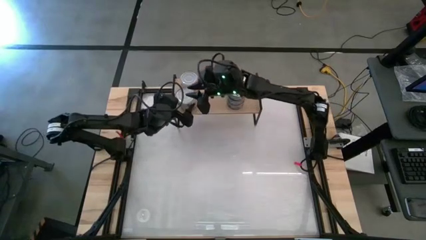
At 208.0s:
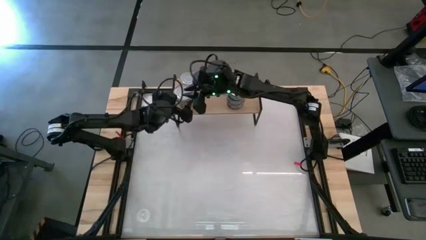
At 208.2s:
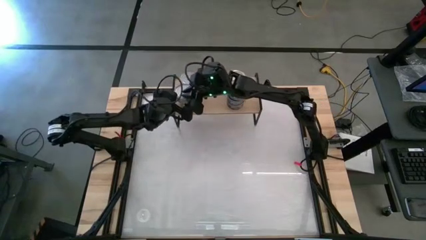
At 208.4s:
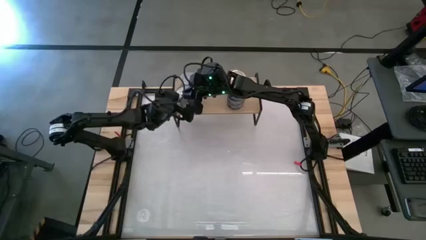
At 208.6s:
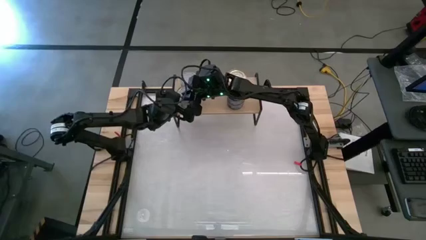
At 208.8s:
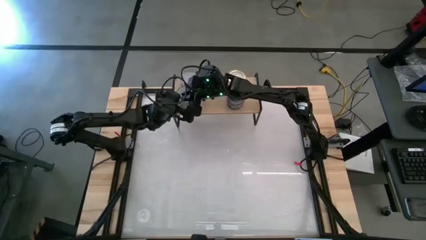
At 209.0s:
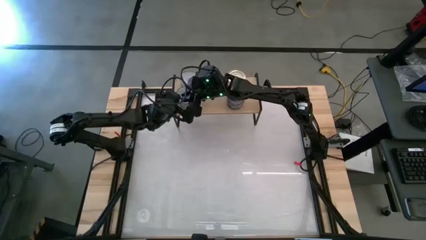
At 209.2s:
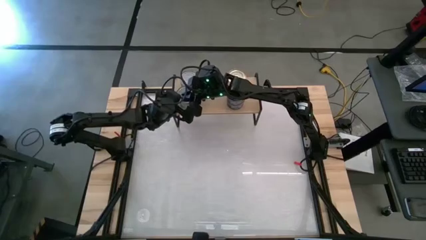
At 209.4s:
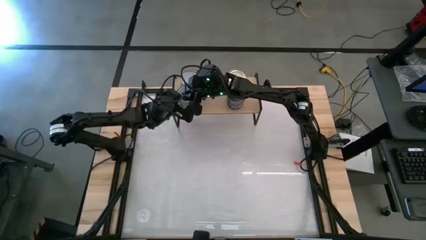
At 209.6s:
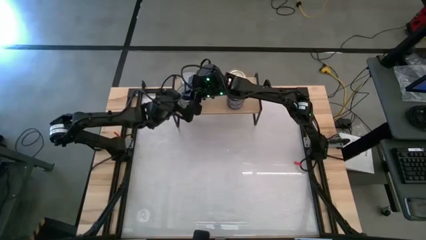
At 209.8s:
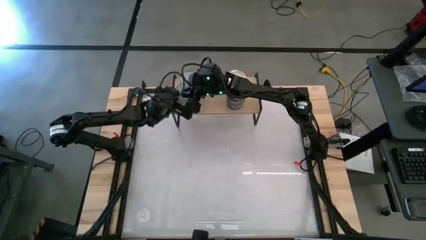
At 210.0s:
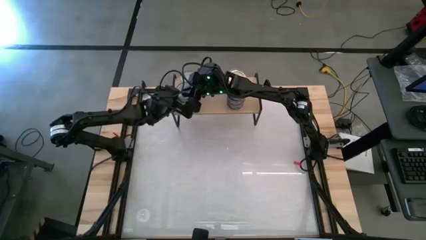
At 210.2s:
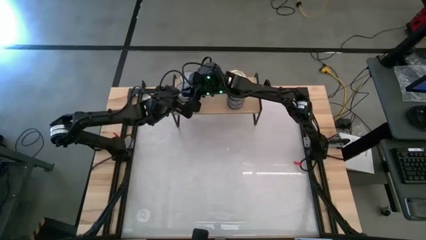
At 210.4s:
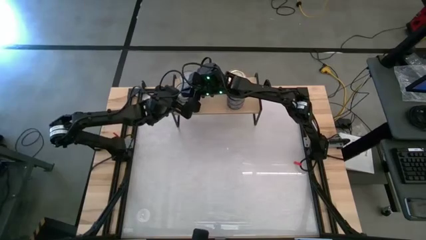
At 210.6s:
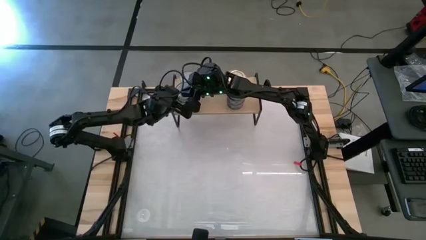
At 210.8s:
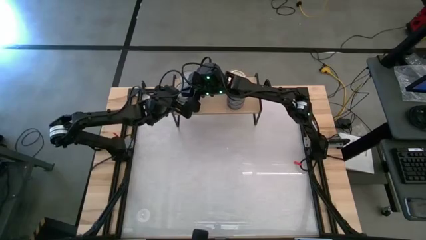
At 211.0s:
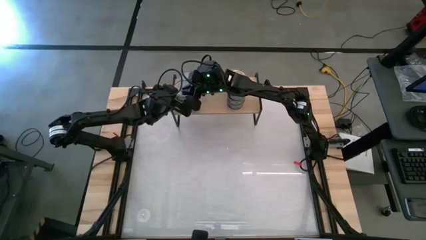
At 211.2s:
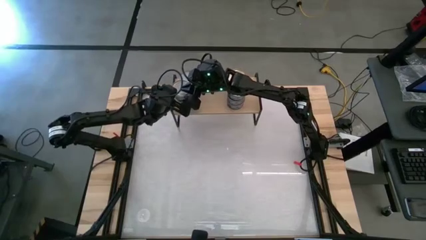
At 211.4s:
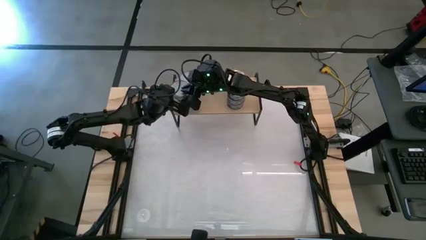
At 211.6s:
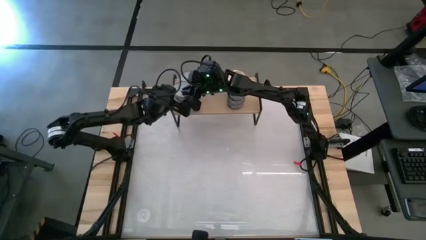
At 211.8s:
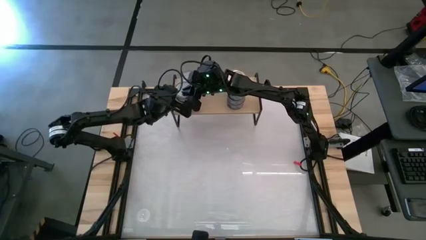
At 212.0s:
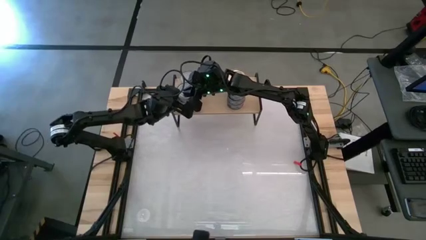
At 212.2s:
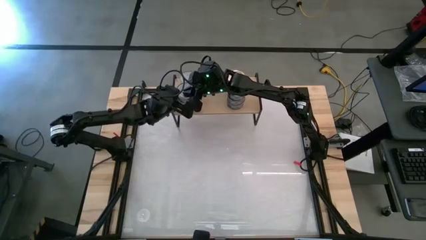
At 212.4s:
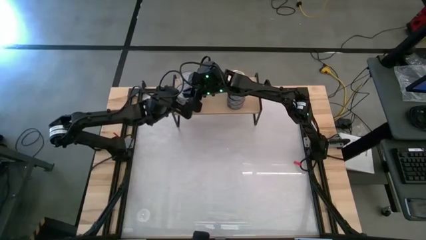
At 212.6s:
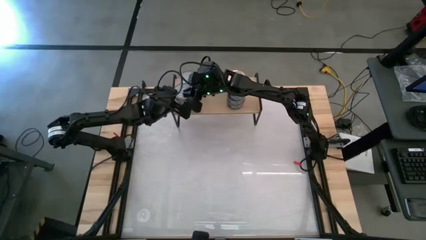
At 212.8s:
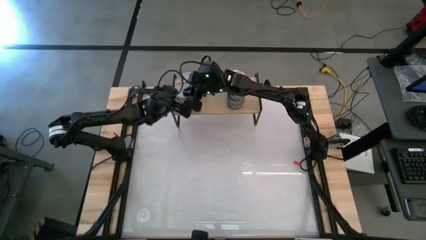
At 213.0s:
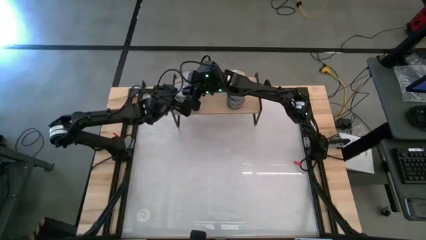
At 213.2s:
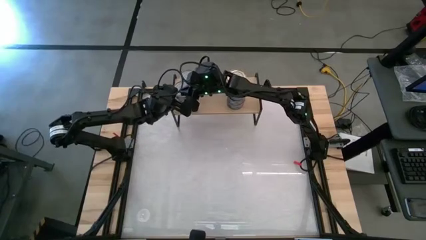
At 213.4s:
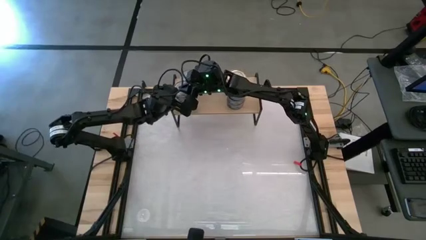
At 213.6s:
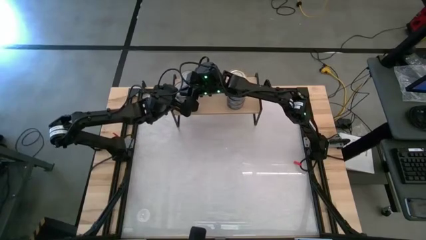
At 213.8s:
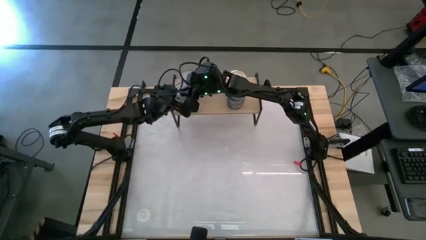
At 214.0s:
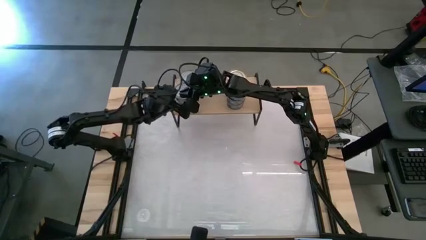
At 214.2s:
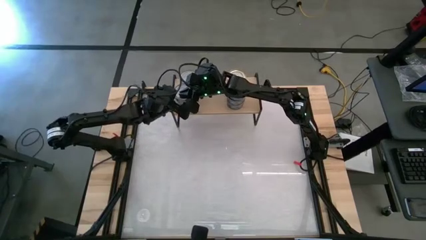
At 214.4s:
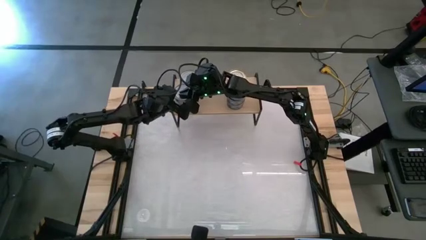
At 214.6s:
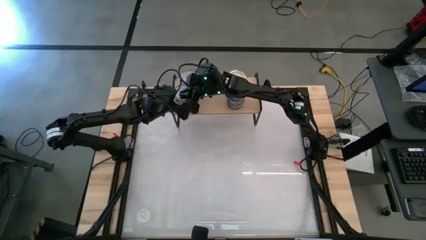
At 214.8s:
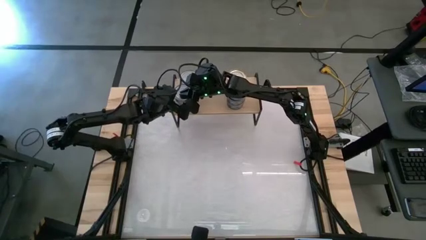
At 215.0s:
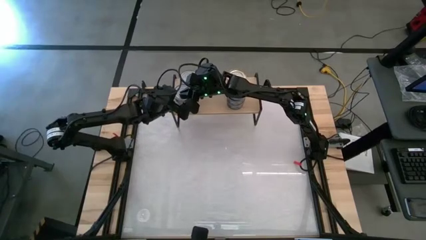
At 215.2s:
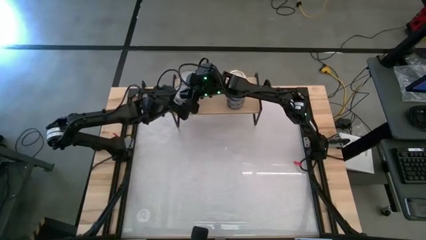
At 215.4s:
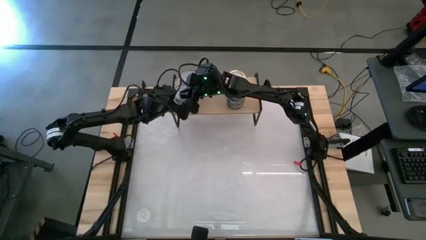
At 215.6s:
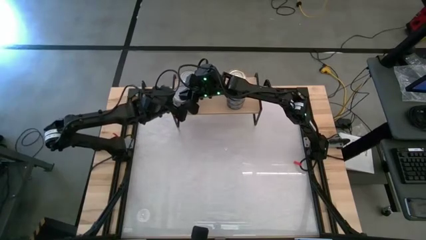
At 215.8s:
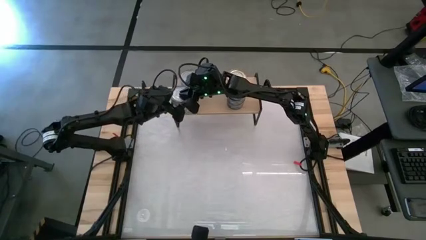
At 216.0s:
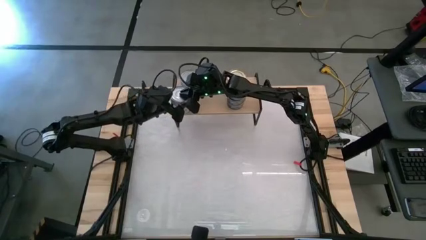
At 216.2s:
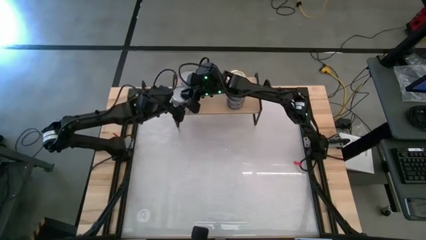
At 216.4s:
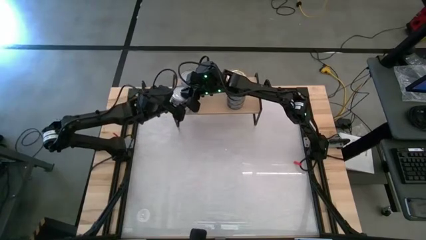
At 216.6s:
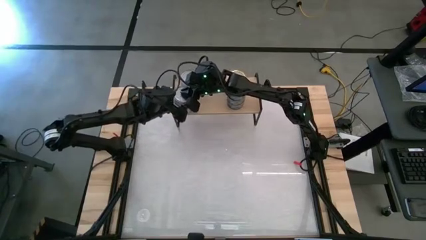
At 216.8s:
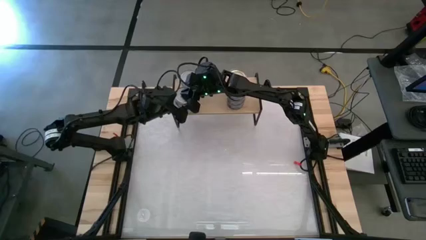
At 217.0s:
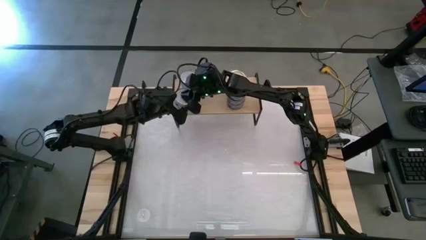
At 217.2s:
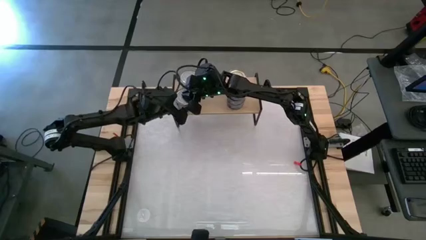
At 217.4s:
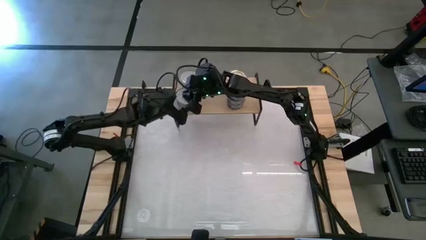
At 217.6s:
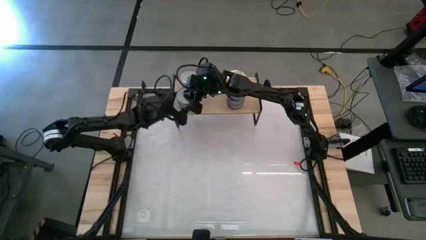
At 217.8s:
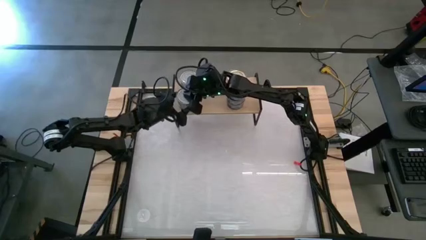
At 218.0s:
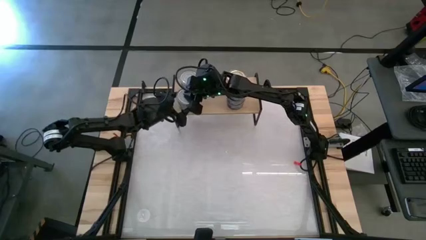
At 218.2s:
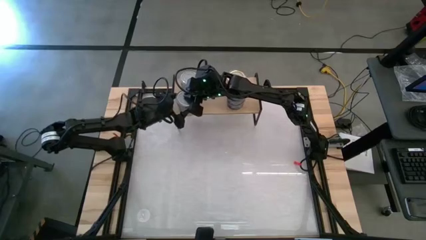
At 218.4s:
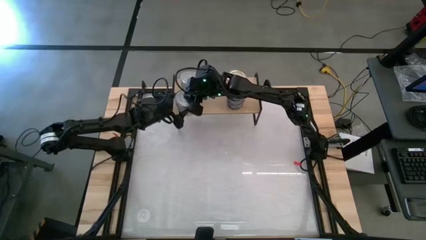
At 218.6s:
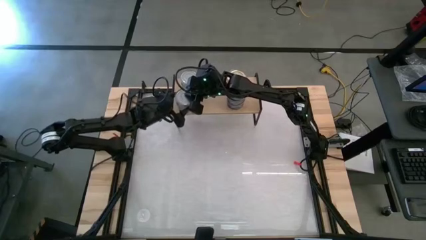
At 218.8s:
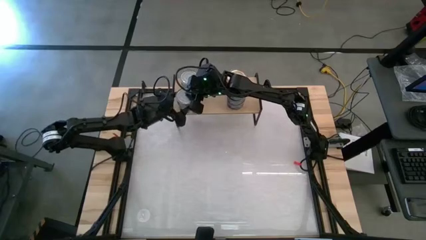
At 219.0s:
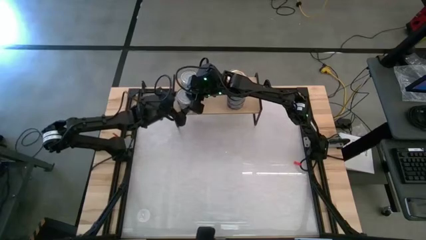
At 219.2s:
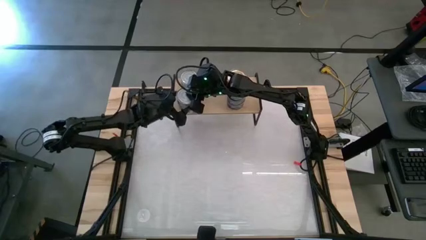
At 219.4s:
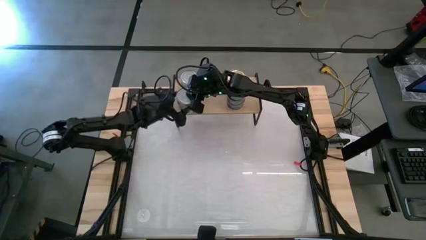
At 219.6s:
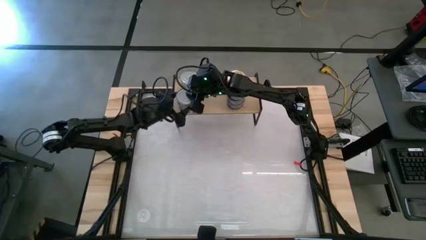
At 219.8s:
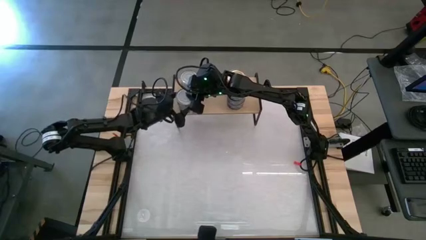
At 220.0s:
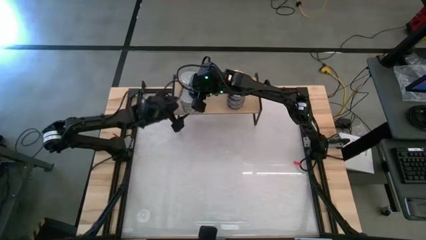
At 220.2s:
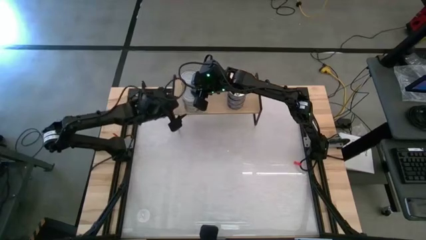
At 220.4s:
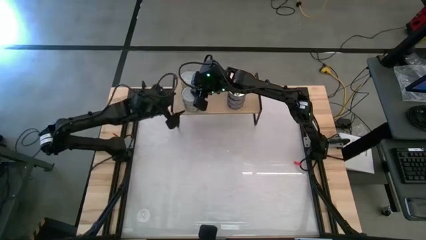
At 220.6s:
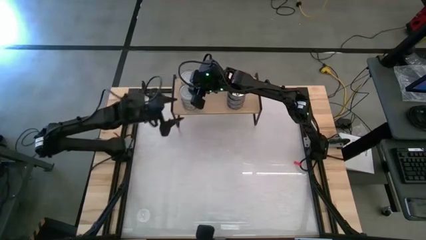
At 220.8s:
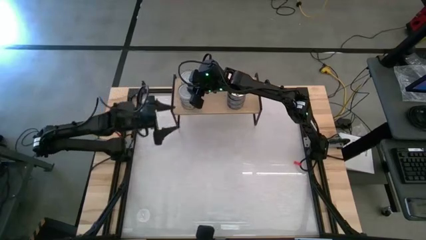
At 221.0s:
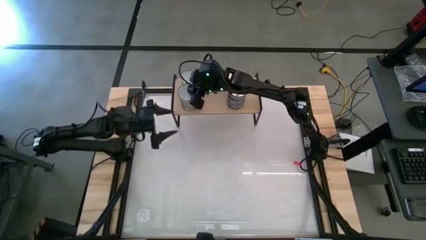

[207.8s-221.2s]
Task: Stack canned seafood by type on shelf
Stack the green tuna can on top of the green tuna can on the shelf

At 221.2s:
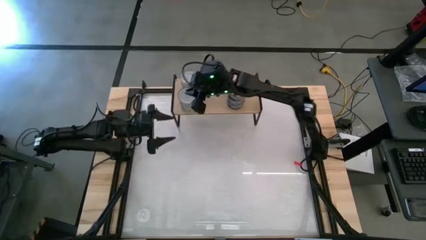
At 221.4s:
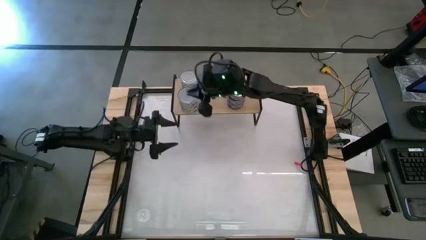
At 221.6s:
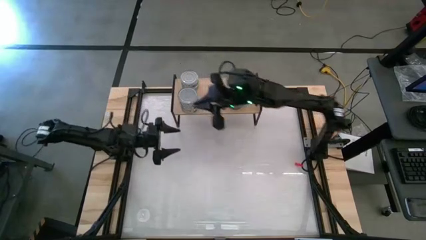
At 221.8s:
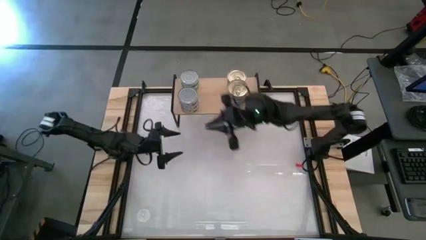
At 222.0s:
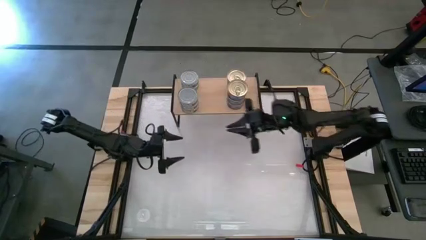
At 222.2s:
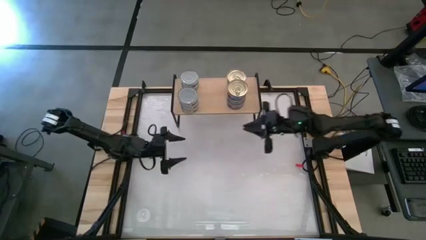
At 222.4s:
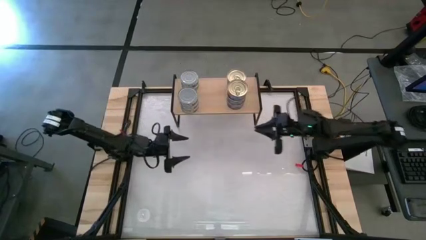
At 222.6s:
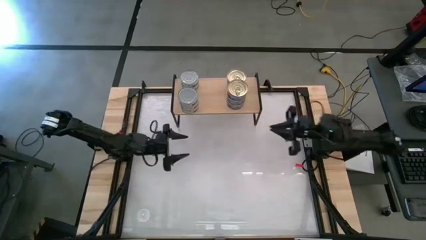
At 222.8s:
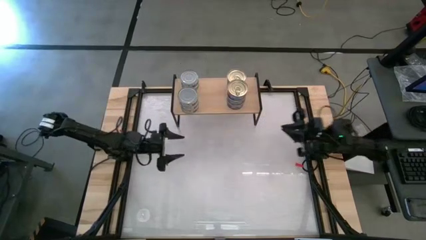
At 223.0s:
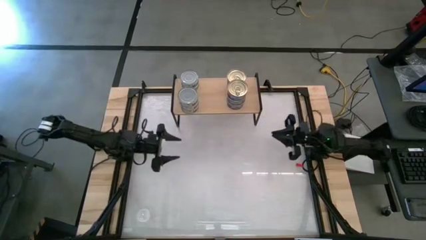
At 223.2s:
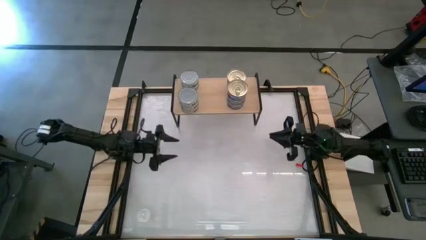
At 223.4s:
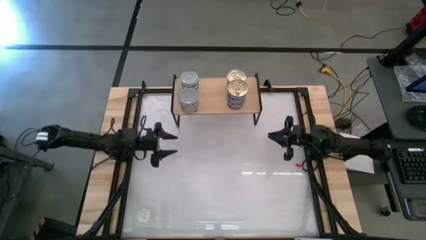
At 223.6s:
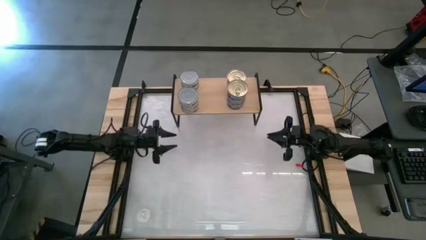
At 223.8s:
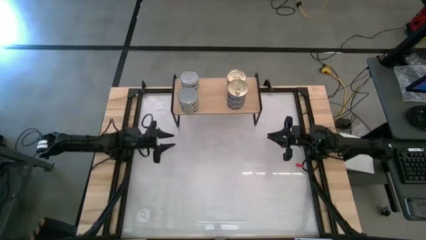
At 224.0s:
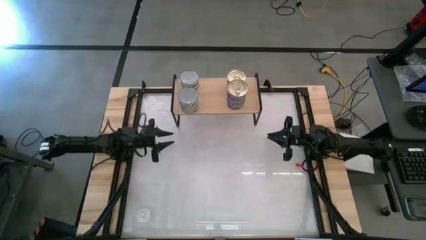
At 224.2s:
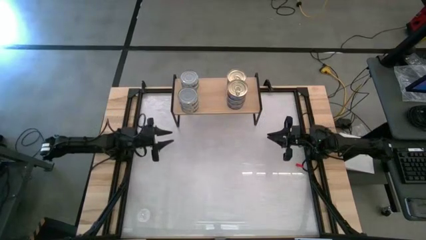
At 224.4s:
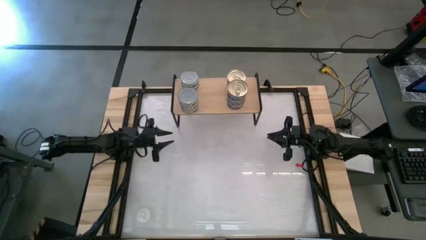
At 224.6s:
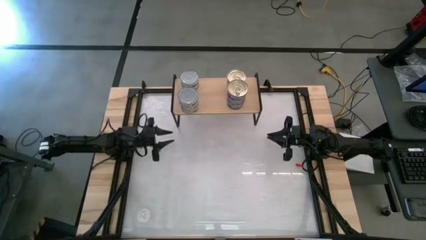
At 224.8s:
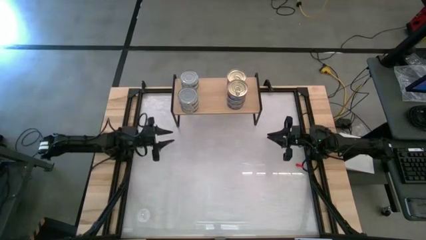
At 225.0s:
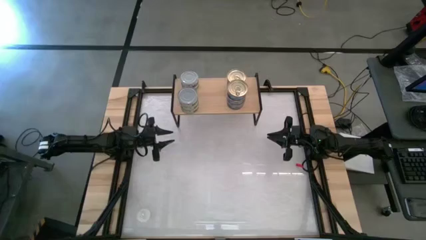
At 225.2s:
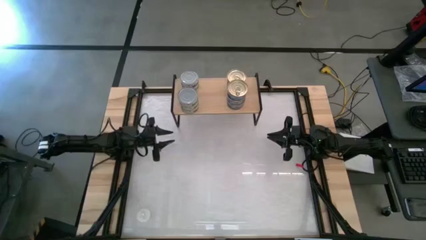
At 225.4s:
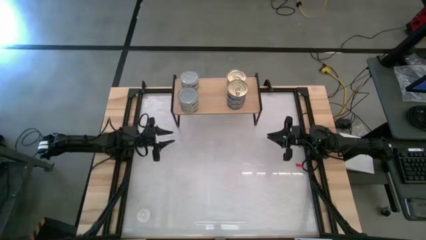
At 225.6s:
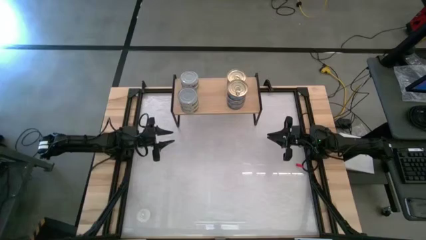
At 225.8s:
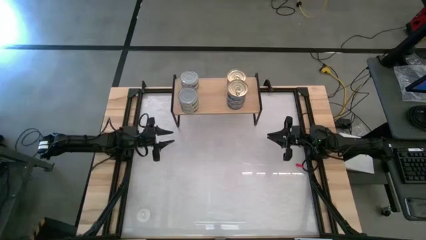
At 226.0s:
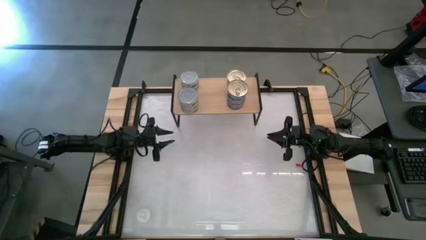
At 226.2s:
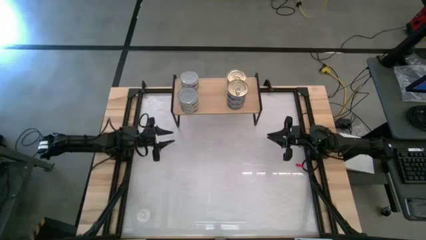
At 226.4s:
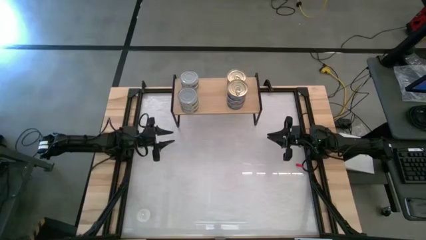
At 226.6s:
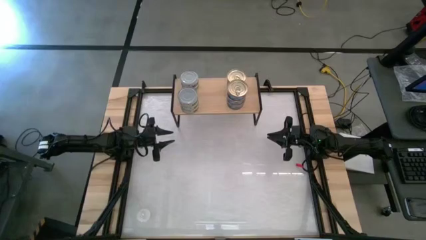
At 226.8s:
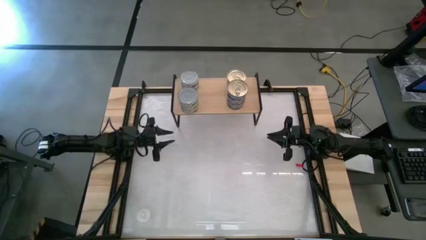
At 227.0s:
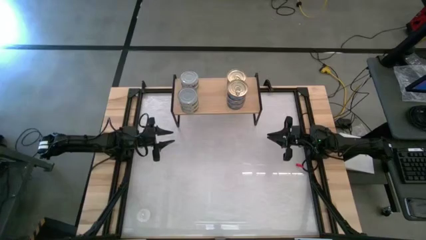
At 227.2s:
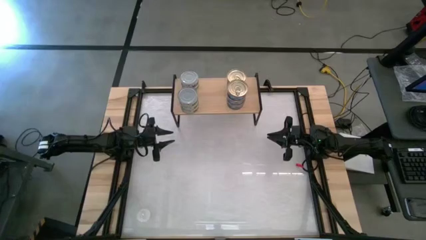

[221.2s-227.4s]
Return to Home Position
